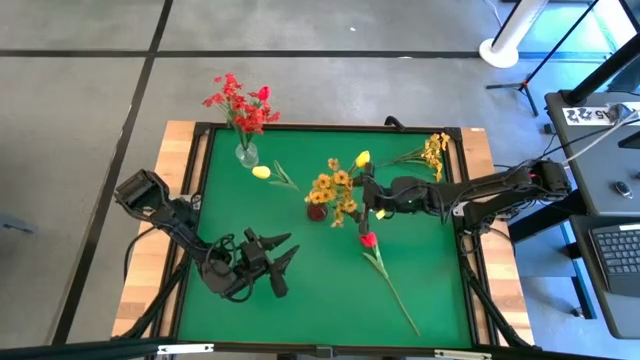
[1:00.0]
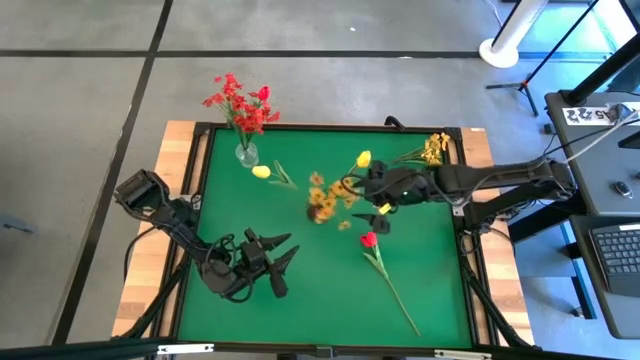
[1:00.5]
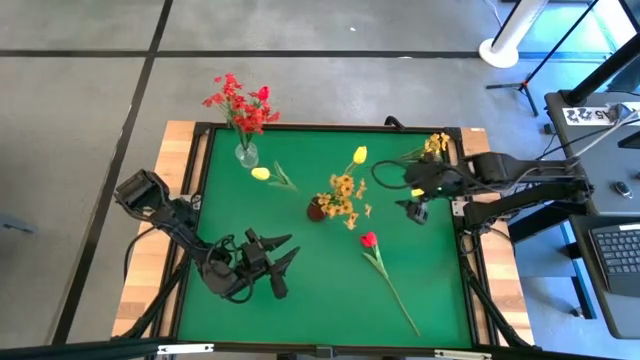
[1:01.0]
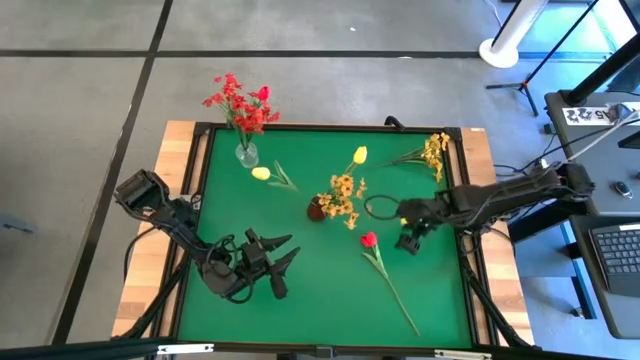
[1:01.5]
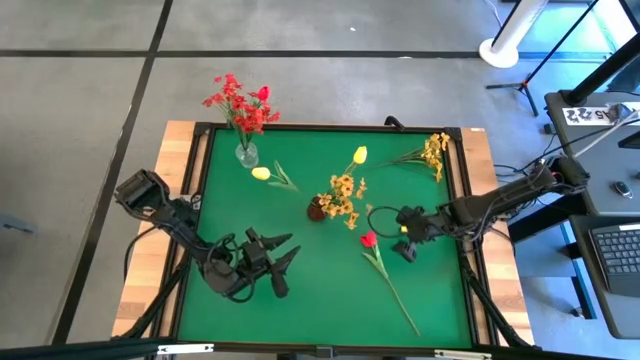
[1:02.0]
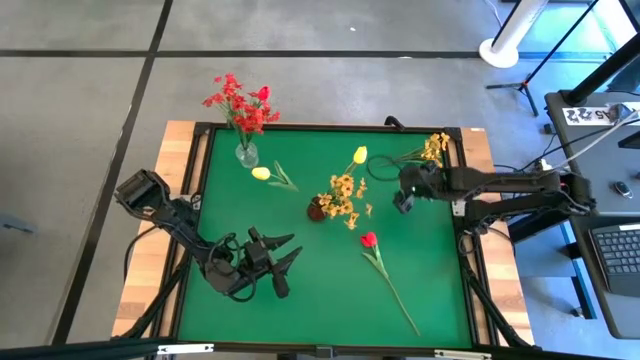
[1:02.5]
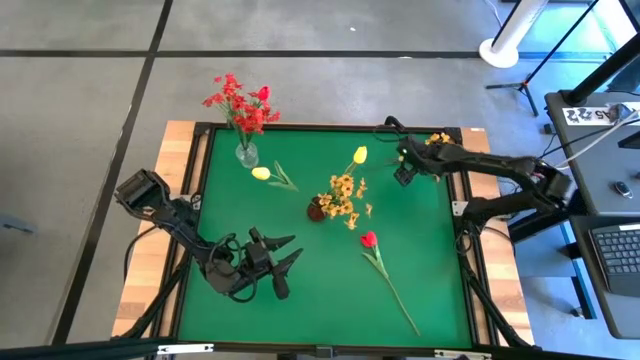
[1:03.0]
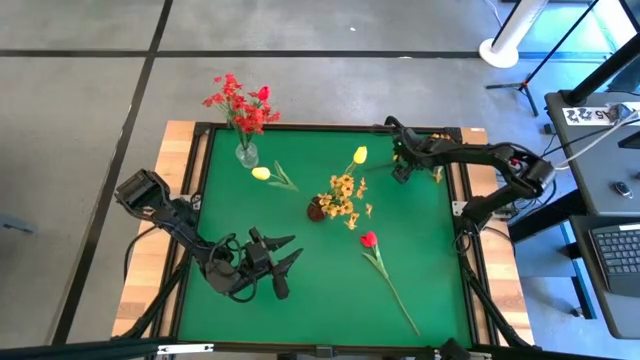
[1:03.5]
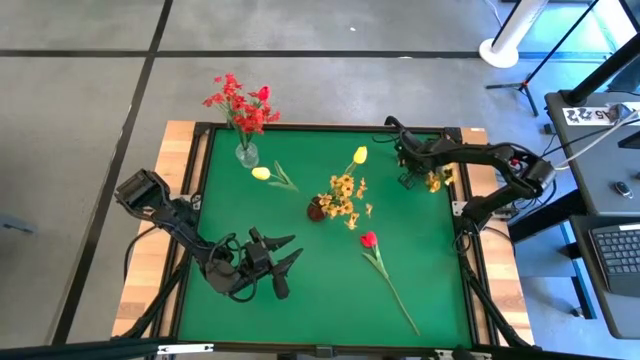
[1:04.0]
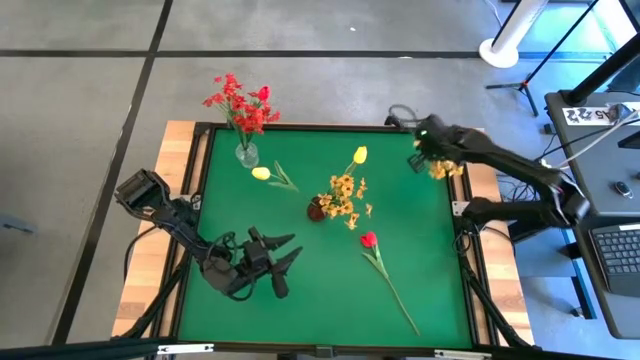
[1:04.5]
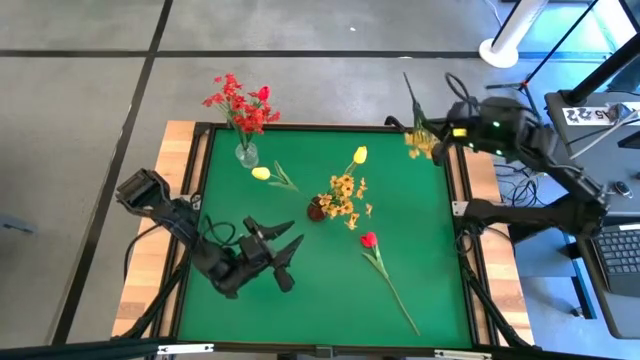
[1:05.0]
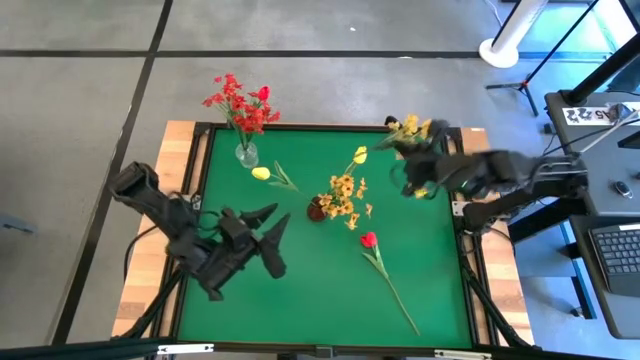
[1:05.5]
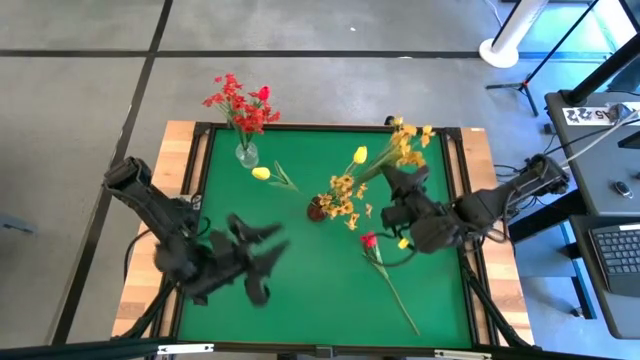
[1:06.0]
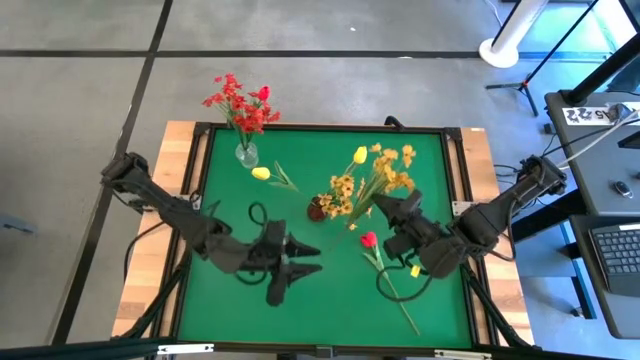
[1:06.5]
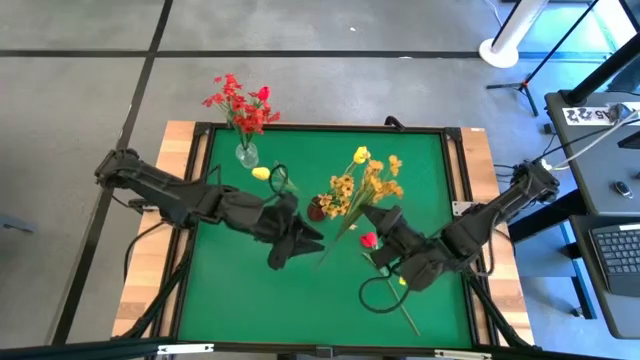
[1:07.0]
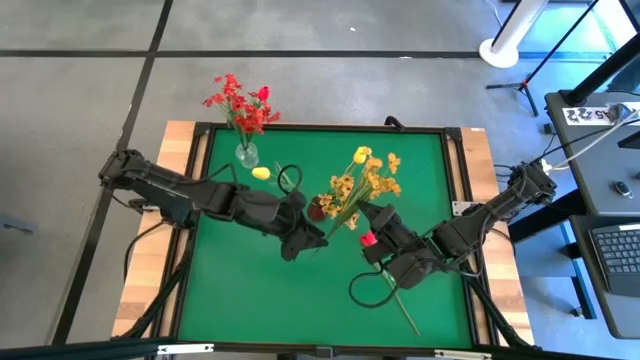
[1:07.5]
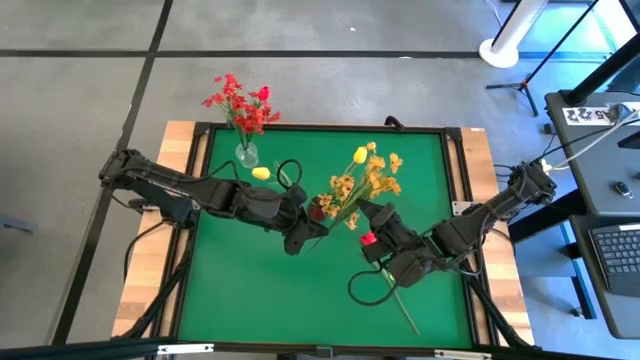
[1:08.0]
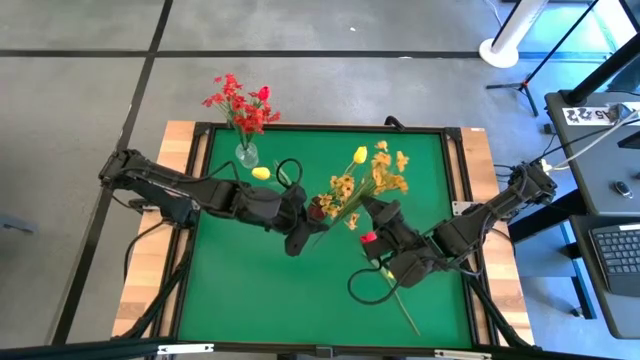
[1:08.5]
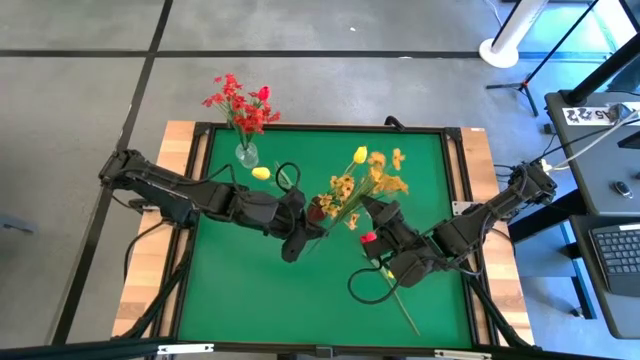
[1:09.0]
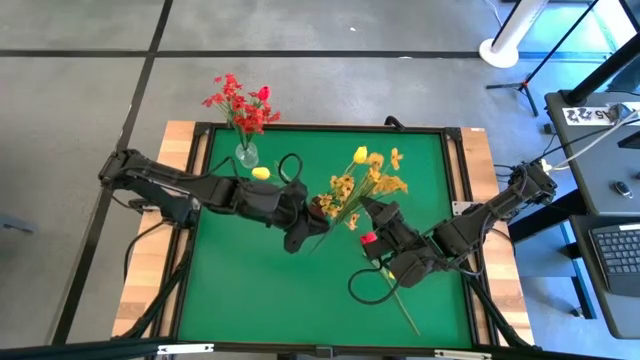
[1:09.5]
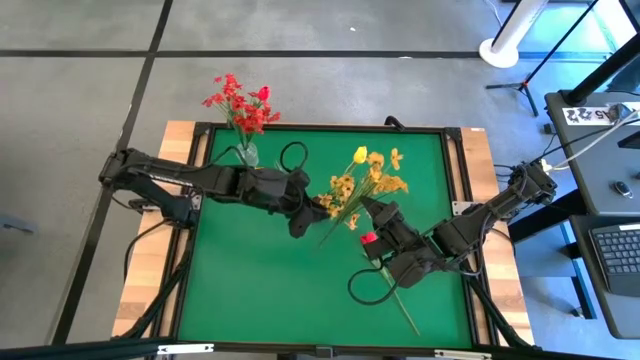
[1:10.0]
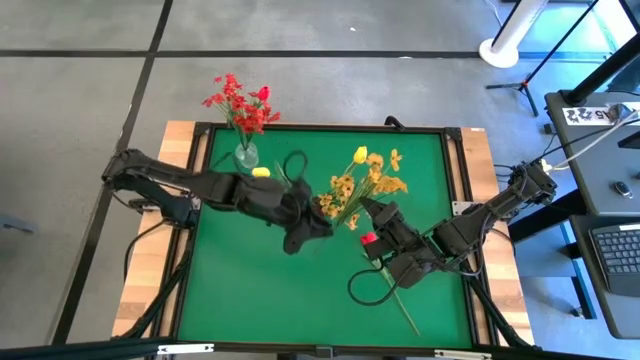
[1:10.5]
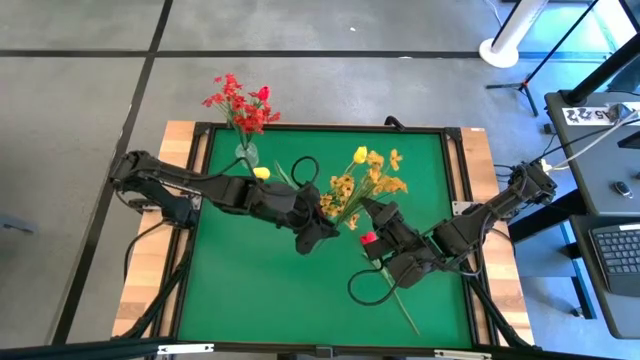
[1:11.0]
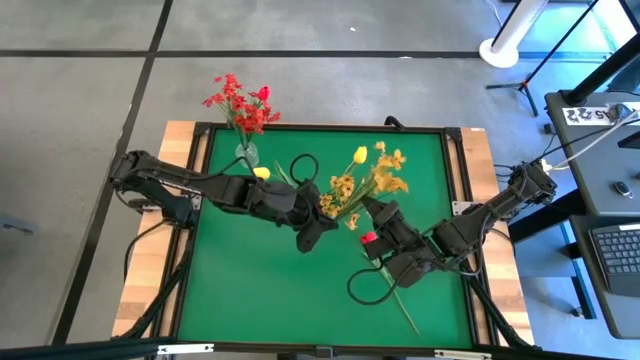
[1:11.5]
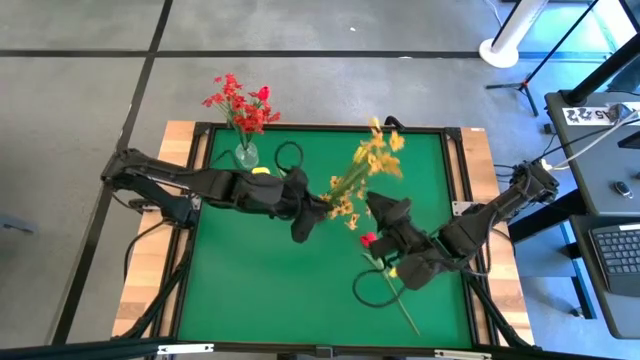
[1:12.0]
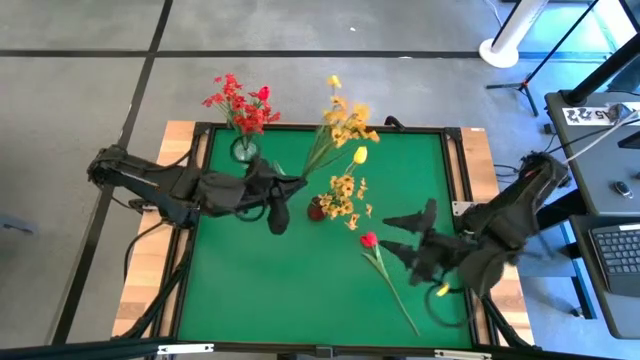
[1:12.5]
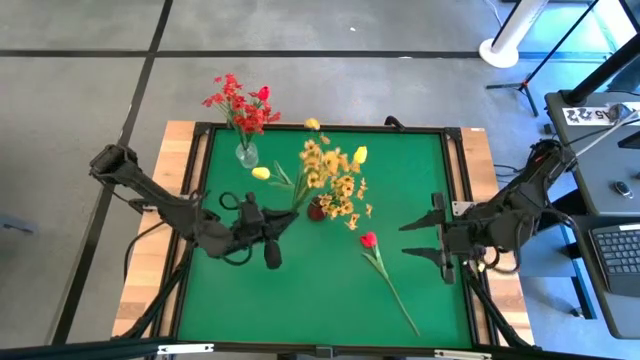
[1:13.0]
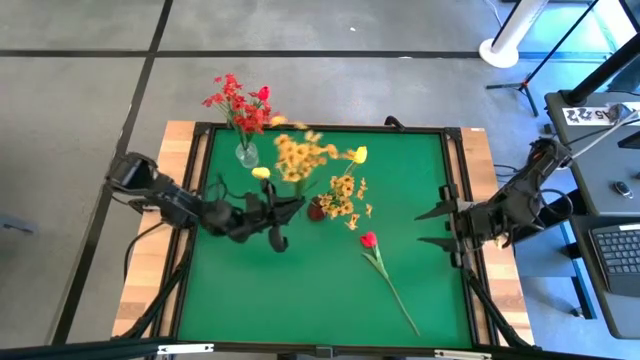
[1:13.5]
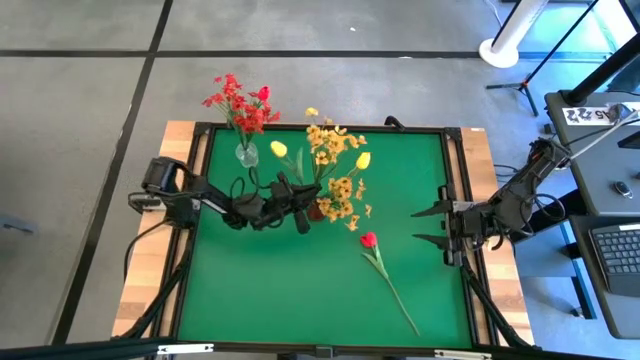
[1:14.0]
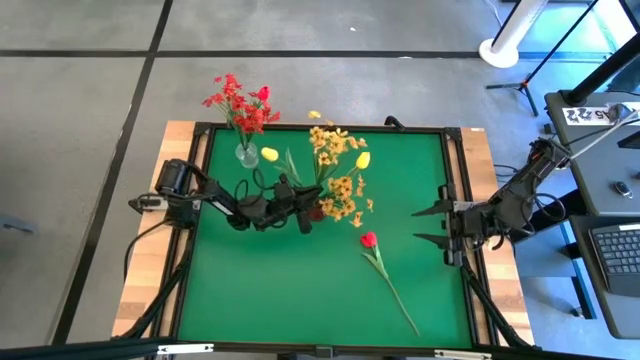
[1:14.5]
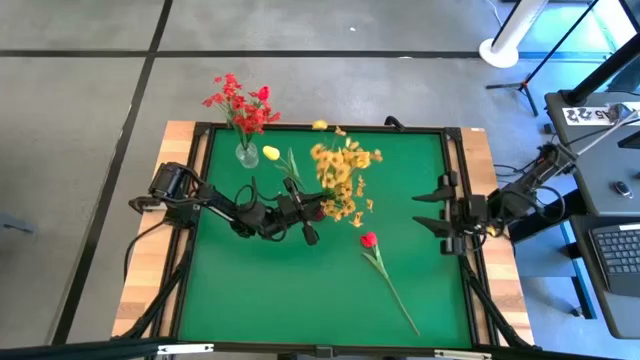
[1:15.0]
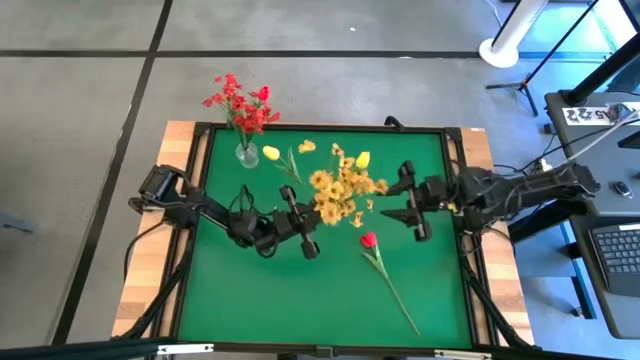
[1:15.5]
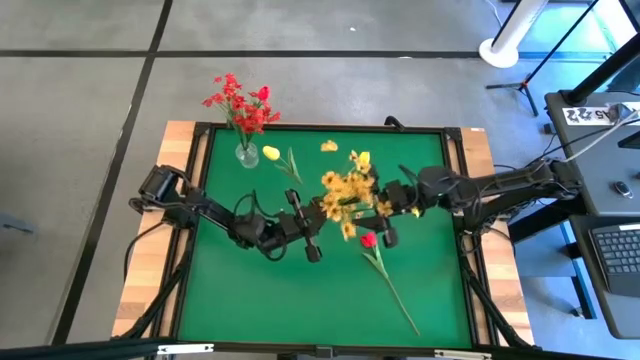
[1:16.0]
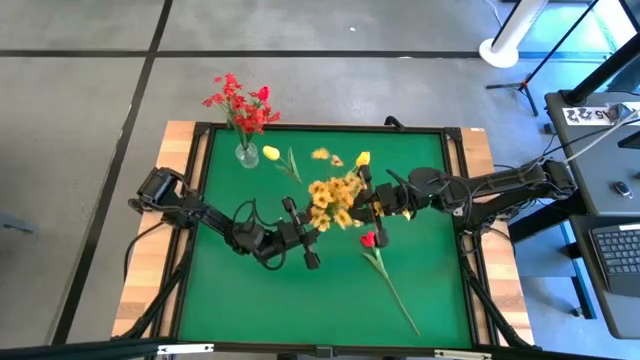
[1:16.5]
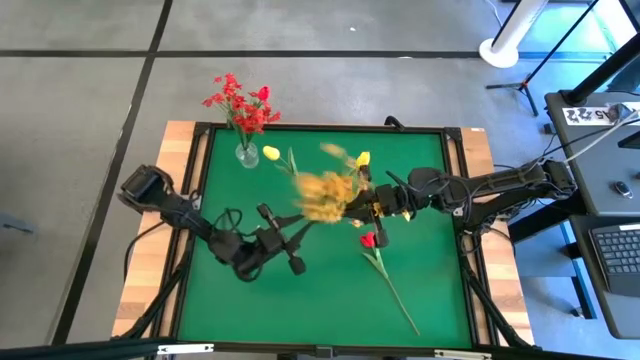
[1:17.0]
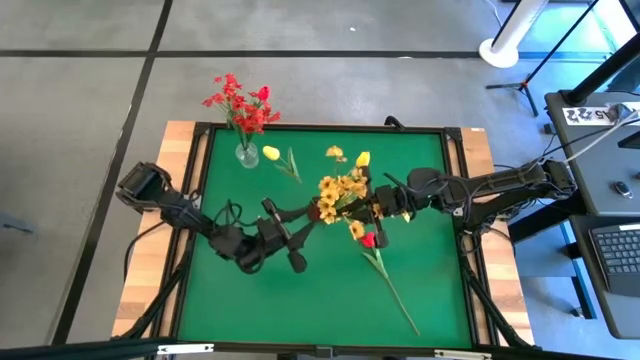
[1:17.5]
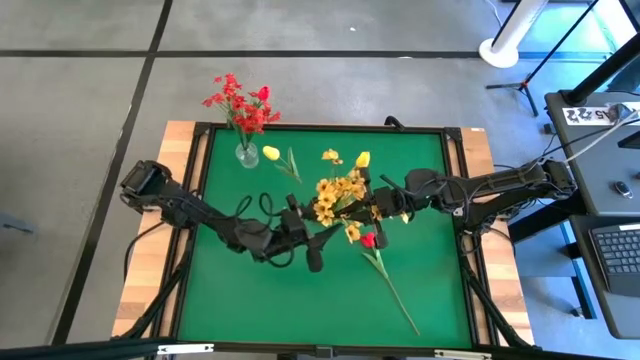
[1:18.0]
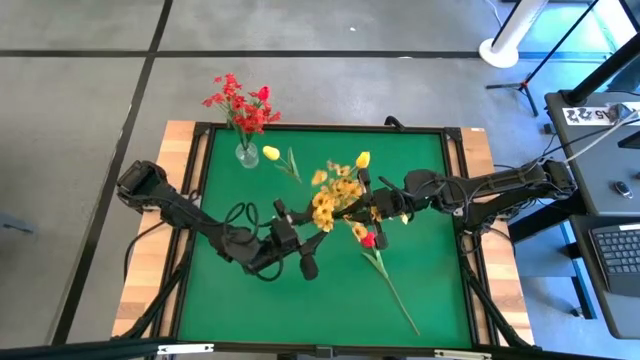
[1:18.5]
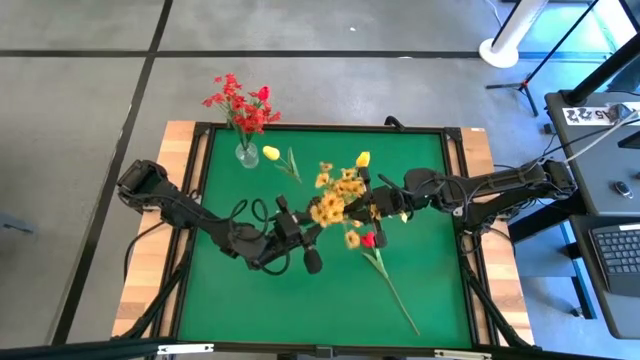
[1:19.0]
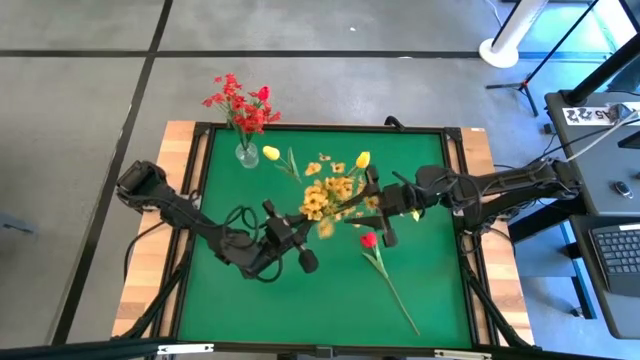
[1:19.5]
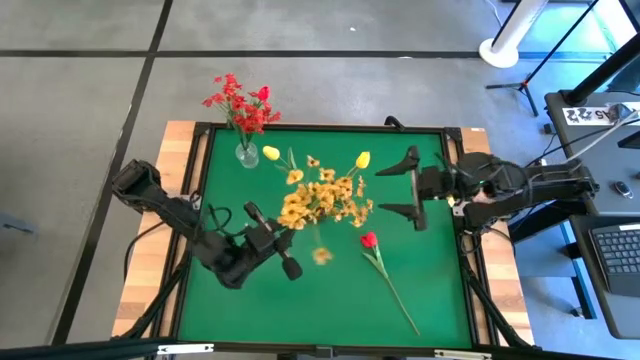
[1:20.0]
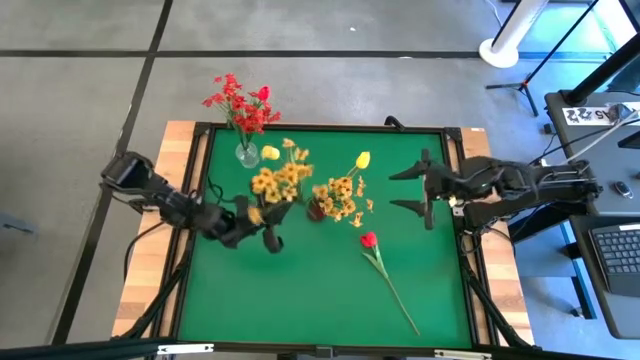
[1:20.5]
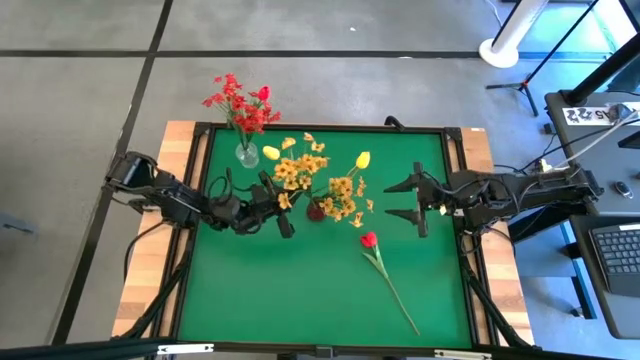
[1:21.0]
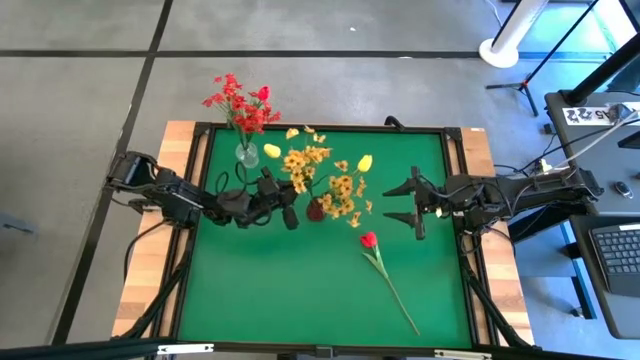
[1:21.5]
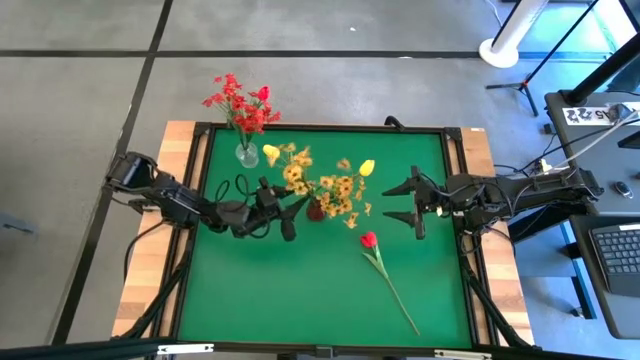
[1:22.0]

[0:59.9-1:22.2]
Task: Sort flowers into vase by color
Put the yellow flowers into the red flower vase
